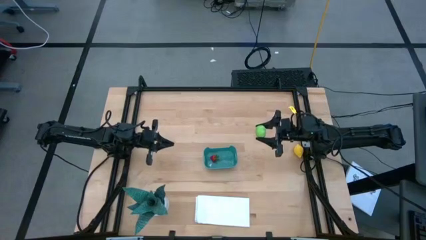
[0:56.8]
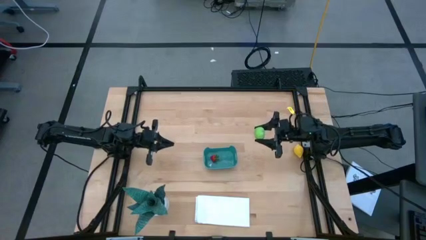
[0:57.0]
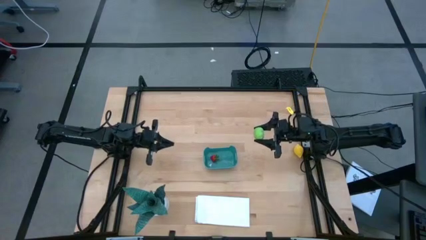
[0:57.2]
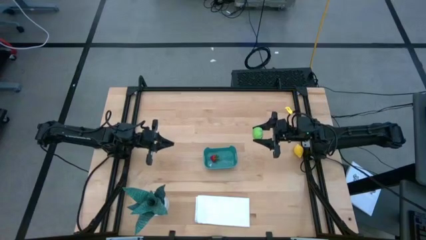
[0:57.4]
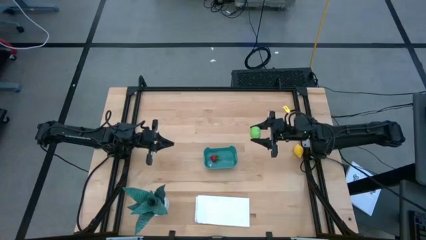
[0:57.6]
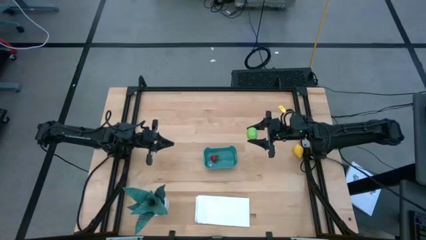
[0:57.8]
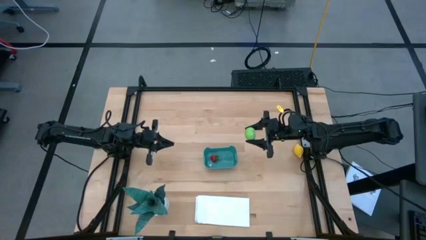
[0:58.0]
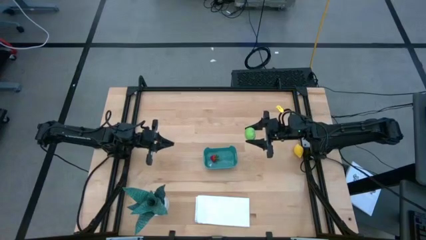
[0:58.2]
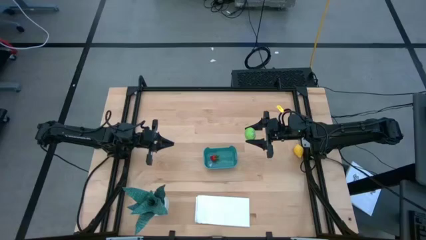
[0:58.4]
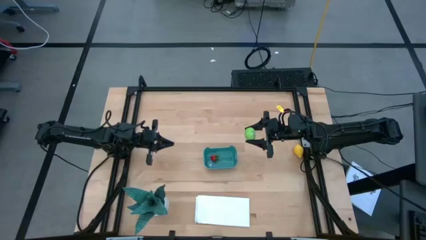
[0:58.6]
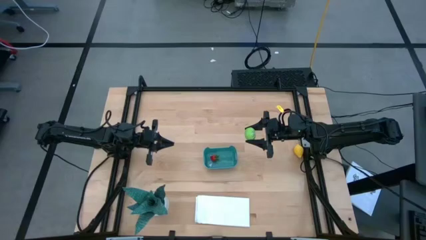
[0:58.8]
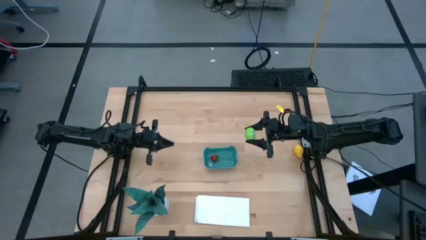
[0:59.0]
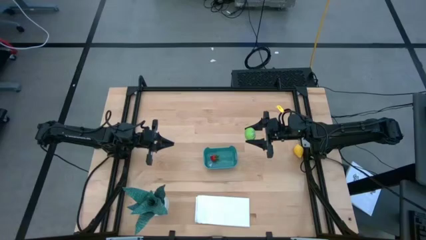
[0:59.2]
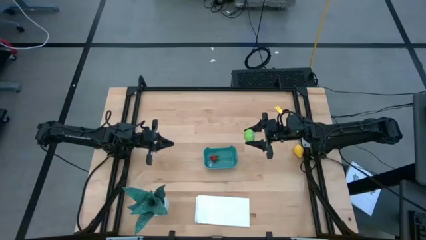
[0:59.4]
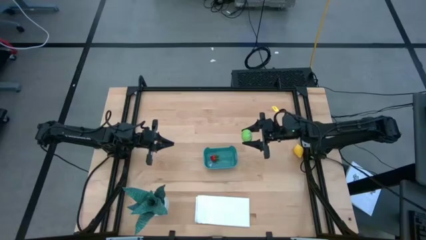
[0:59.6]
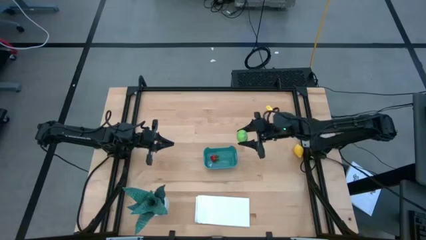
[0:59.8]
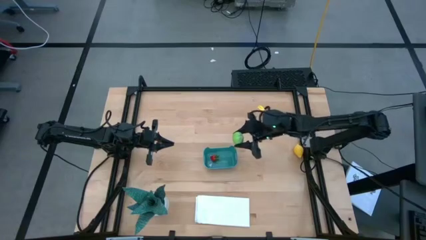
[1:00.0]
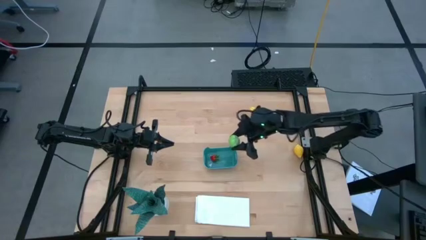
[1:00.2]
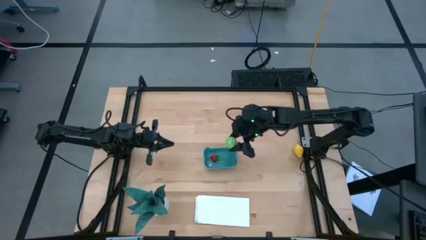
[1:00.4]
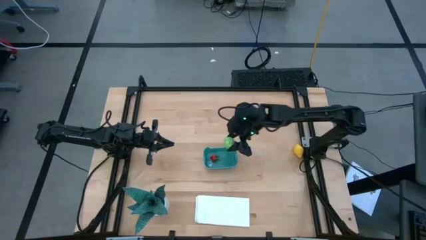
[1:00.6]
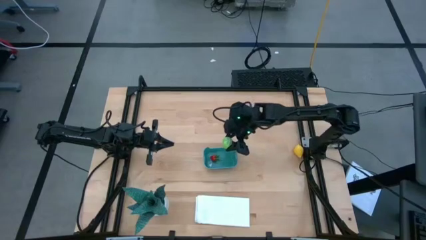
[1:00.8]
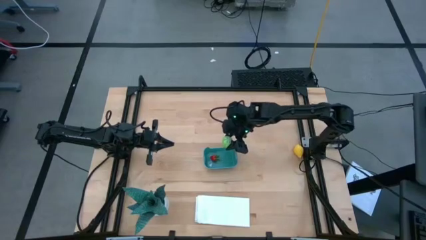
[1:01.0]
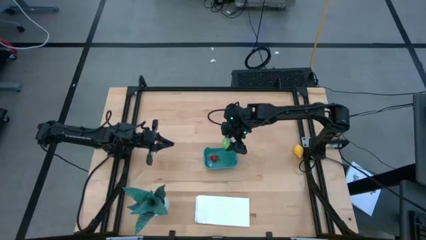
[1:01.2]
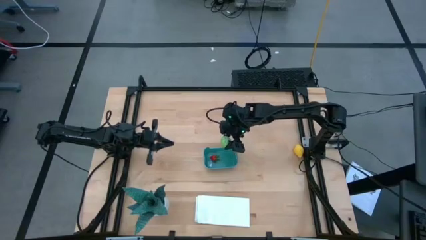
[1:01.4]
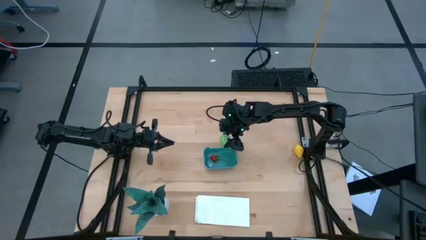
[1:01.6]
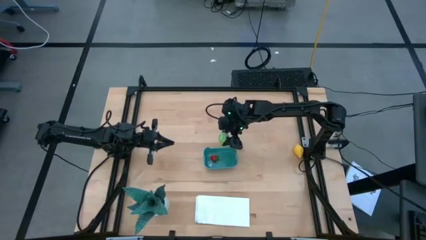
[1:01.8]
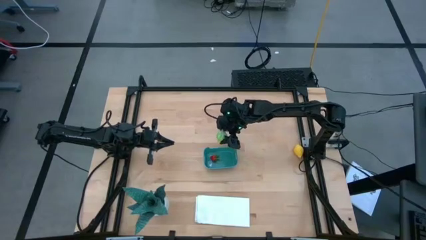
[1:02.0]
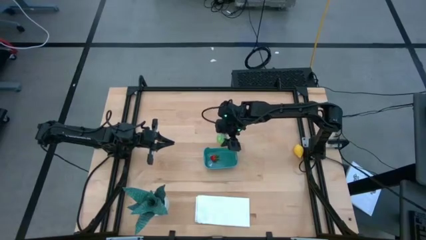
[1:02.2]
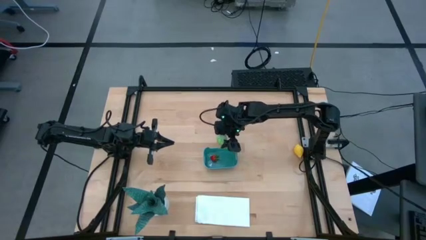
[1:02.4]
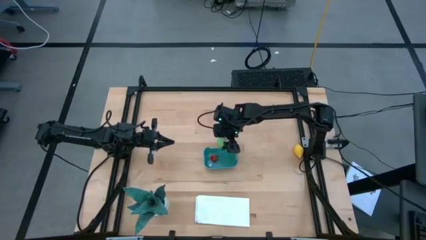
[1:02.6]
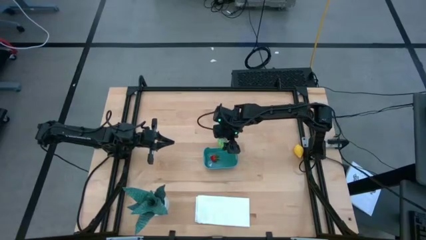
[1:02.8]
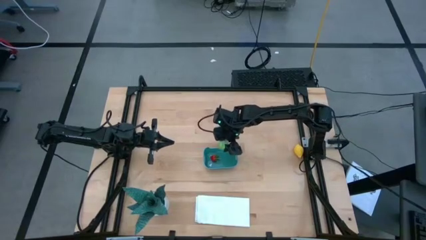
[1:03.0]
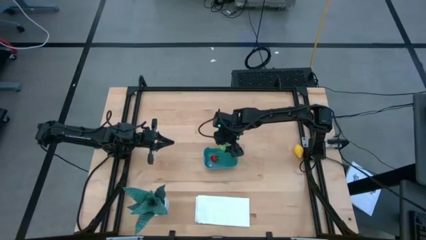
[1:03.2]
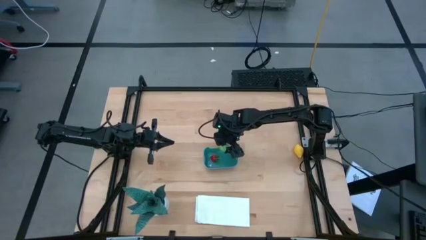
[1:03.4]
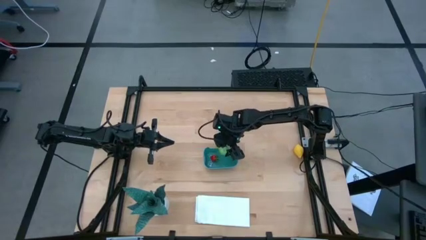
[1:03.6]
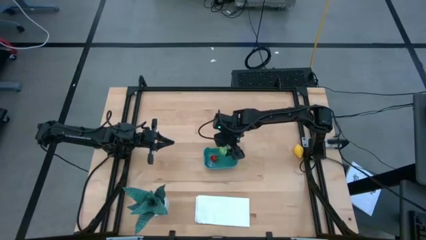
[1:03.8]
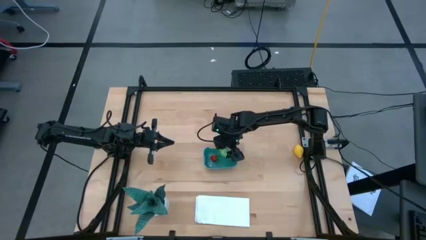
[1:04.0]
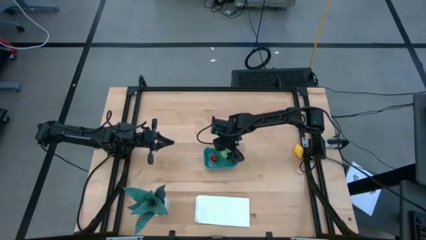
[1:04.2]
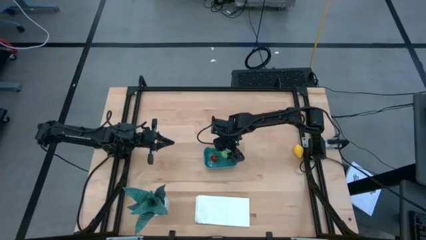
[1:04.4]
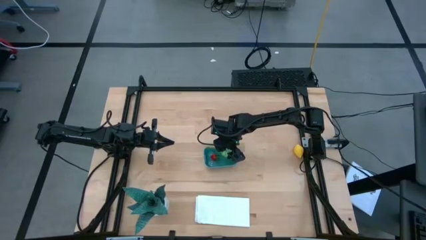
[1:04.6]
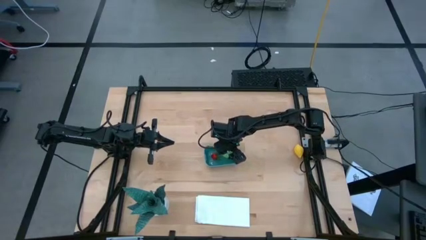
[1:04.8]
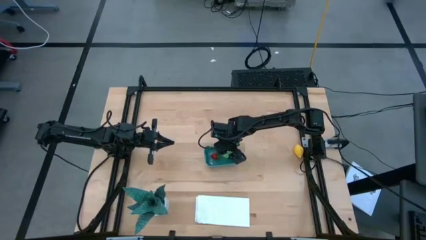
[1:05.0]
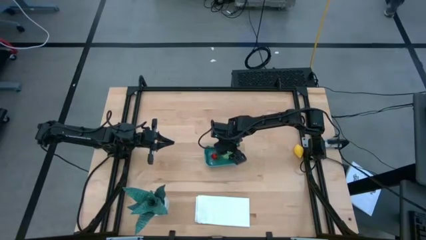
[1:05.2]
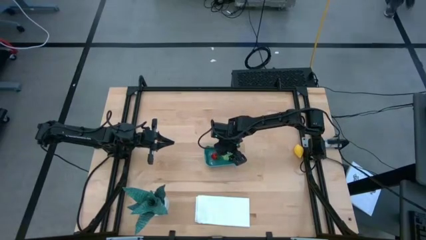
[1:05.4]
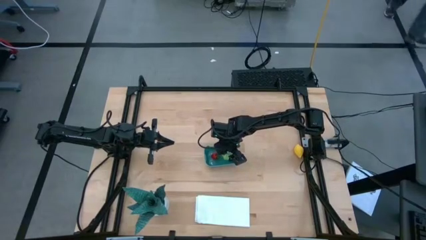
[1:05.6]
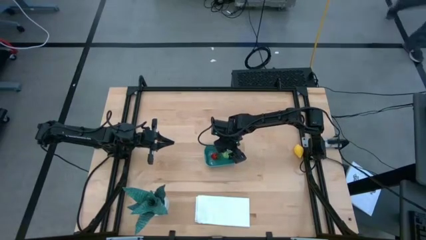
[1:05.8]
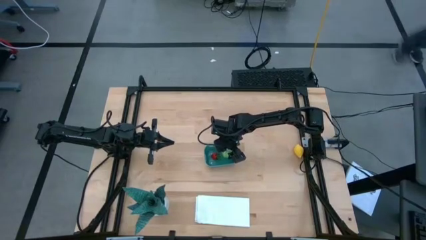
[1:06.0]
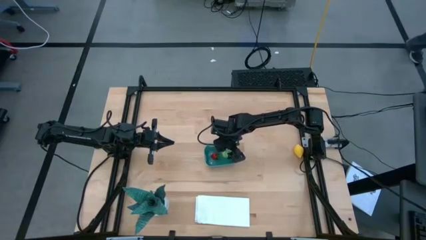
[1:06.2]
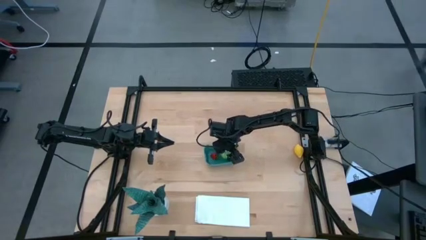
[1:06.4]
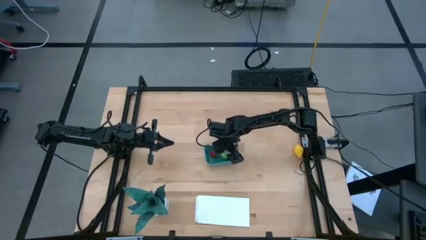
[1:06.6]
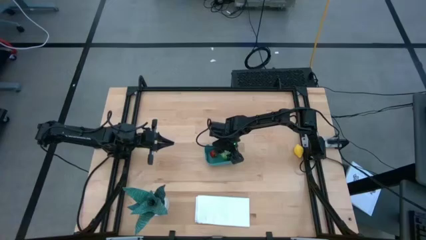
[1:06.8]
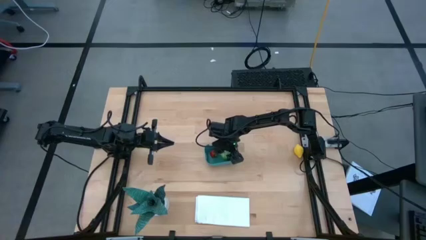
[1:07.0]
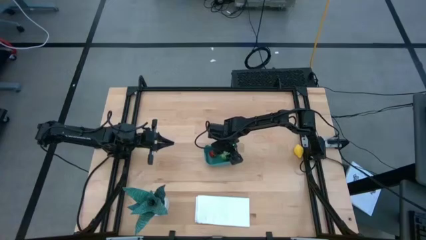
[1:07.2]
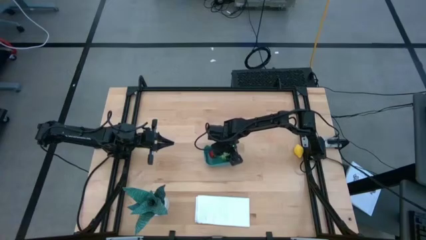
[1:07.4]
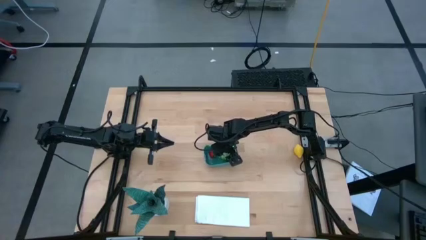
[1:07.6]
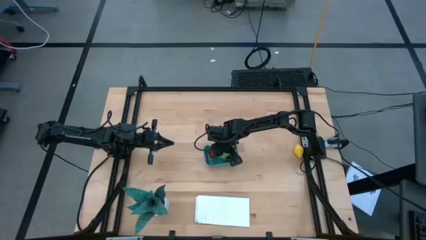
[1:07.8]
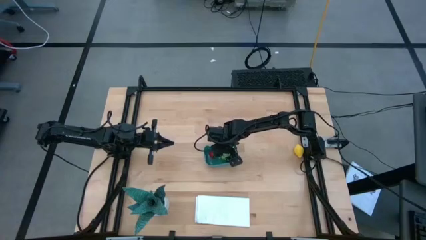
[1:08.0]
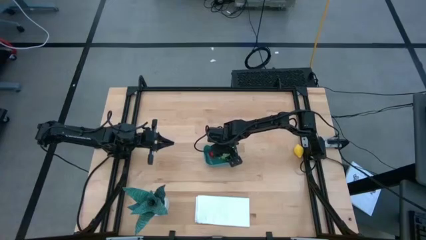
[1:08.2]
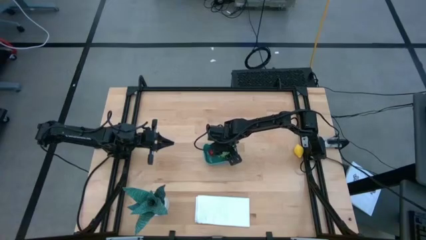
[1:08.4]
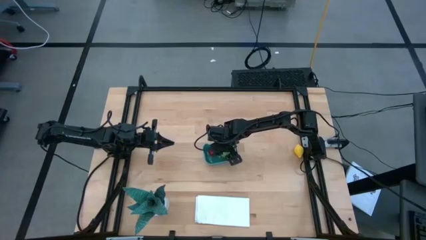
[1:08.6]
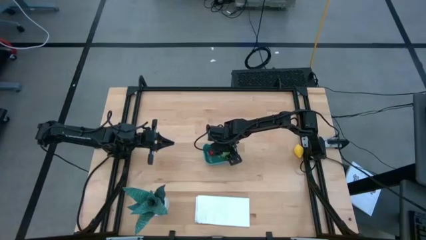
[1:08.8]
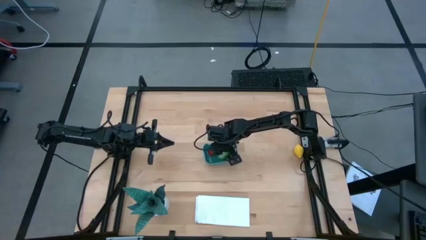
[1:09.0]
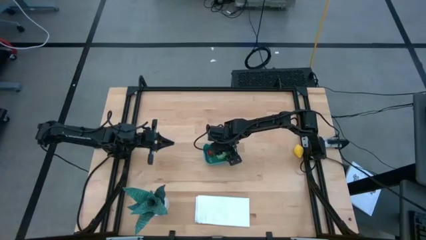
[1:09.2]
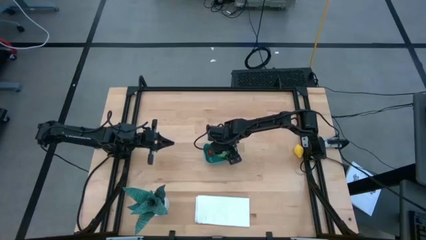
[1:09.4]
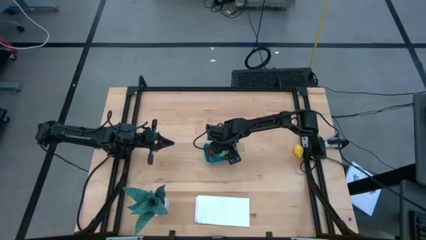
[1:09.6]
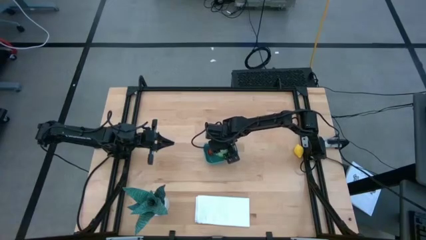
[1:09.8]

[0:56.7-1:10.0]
Task: Pick and placing Produce into tupperware
Put the green cabbage into the blue bin

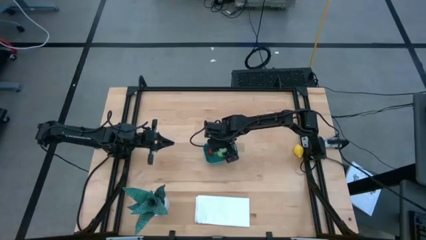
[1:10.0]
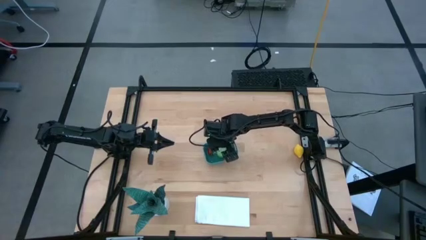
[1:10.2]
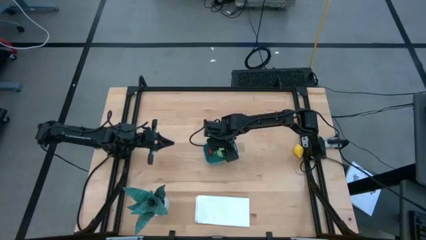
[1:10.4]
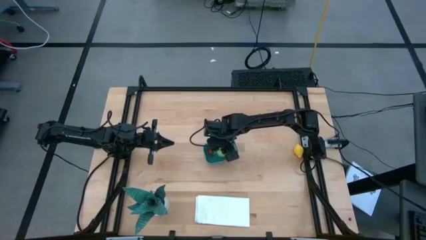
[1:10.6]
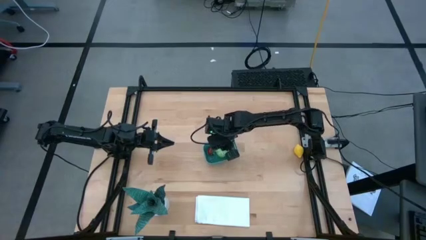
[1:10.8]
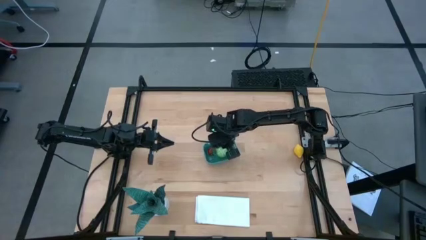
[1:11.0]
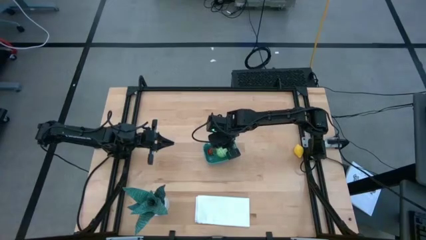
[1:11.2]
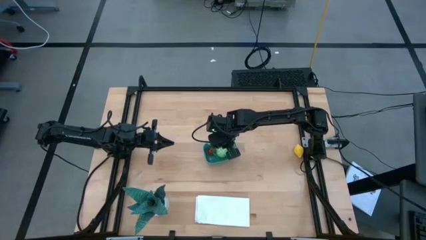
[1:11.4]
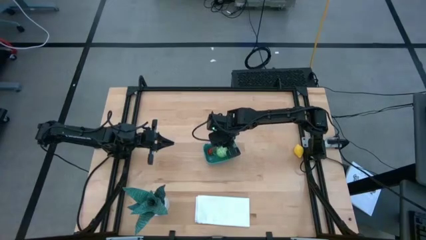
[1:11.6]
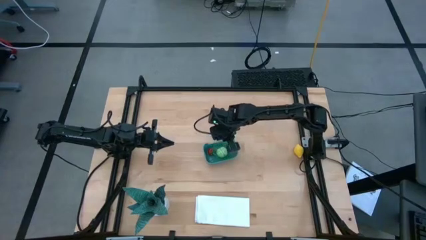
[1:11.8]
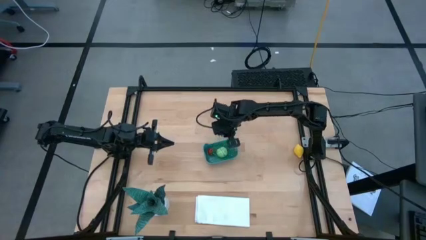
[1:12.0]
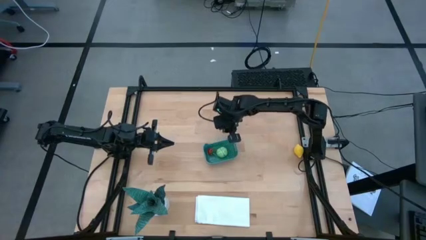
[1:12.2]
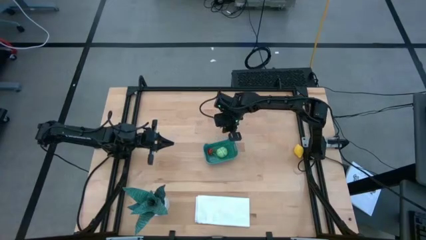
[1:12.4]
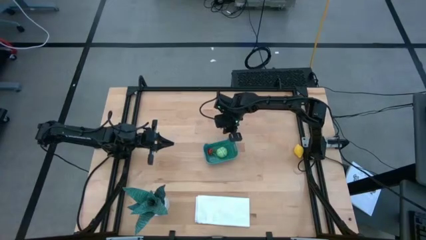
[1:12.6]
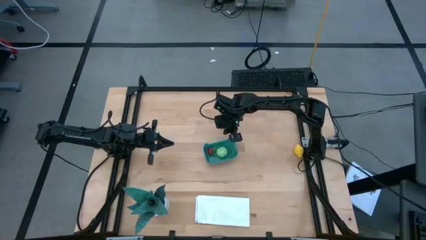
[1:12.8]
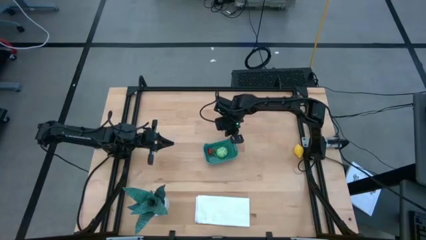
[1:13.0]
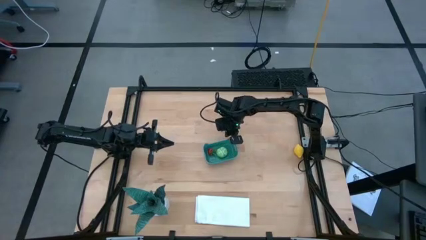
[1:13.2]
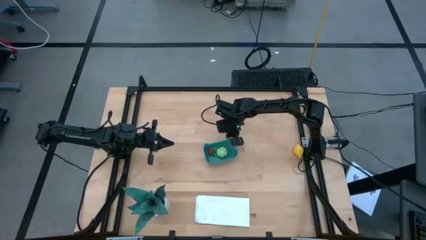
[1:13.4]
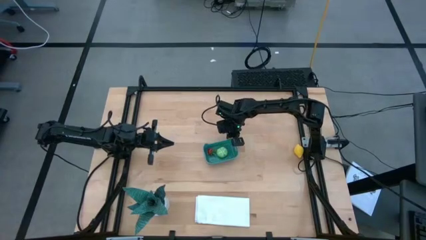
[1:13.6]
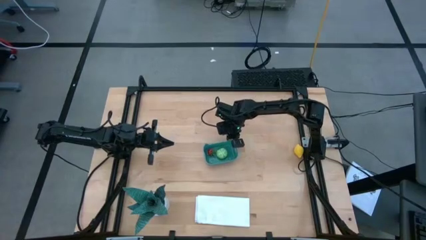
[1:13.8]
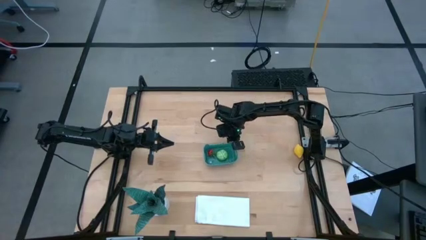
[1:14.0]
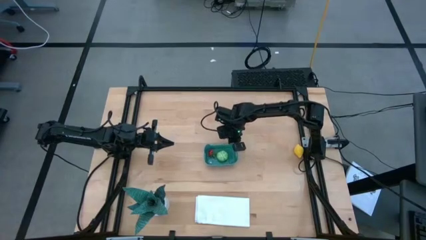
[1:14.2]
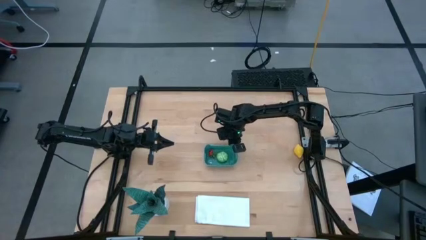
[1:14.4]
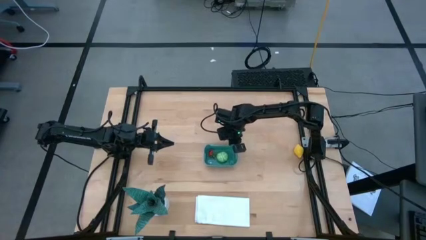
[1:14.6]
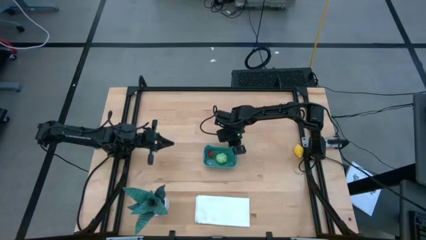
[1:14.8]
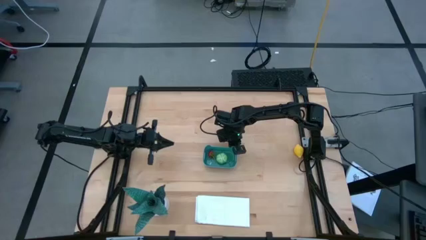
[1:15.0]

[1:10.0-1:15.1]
Adjust the blue bin
